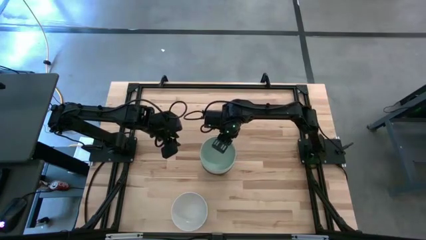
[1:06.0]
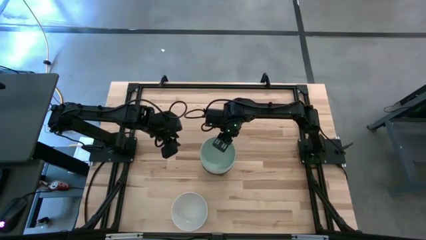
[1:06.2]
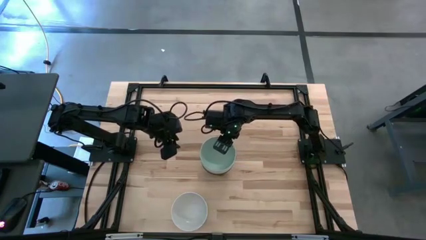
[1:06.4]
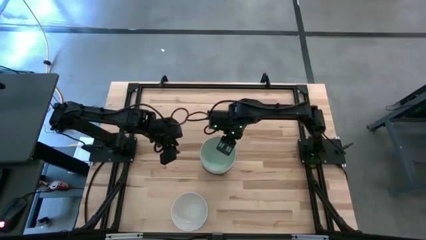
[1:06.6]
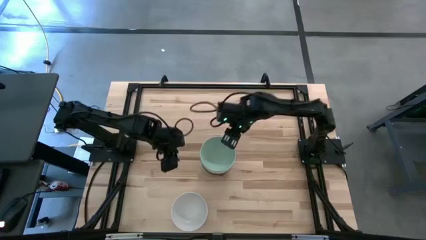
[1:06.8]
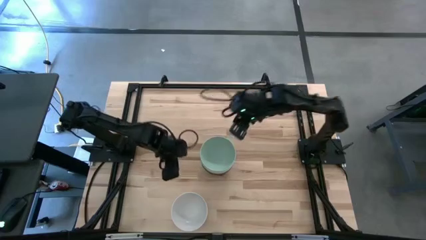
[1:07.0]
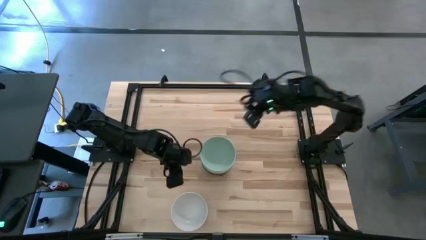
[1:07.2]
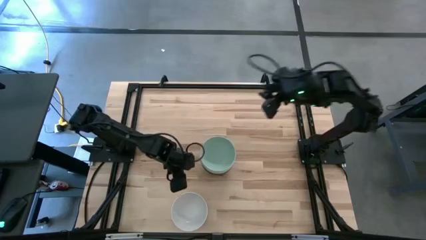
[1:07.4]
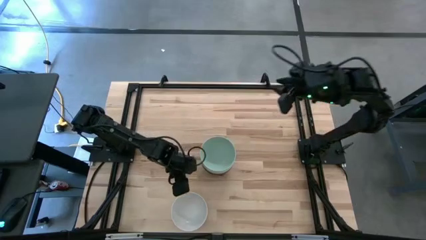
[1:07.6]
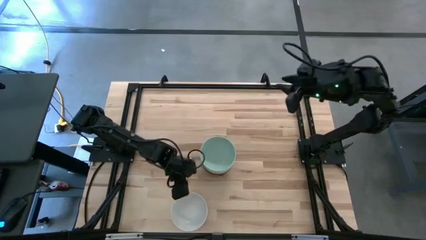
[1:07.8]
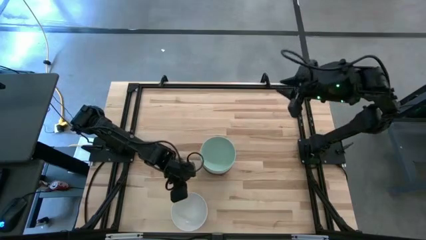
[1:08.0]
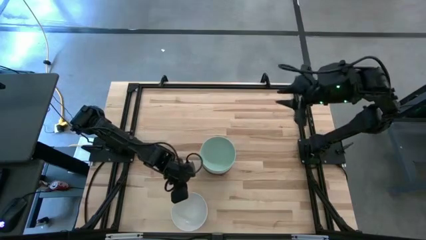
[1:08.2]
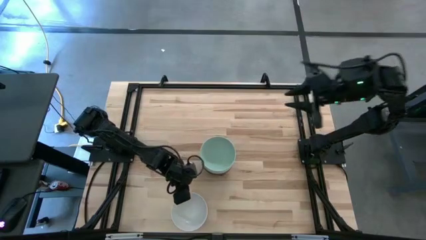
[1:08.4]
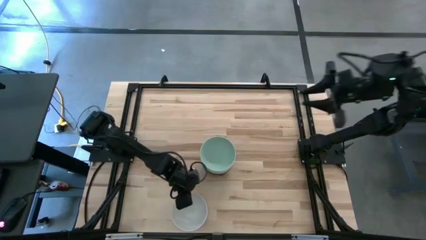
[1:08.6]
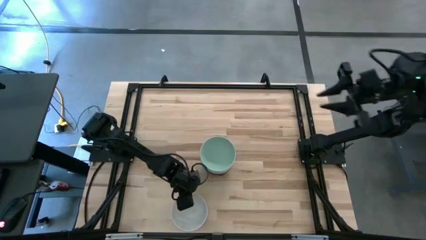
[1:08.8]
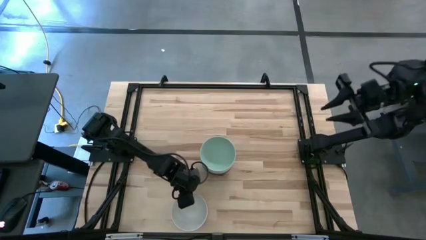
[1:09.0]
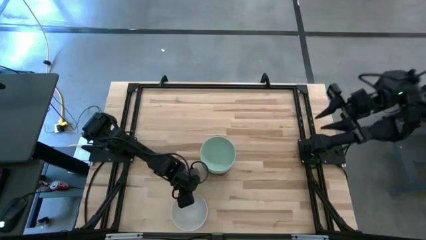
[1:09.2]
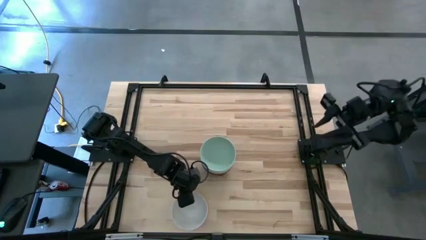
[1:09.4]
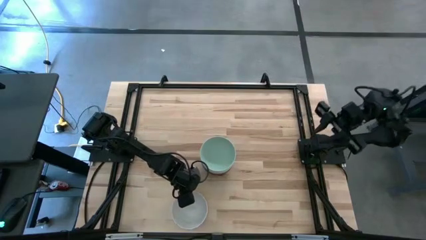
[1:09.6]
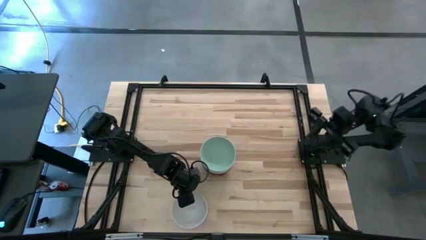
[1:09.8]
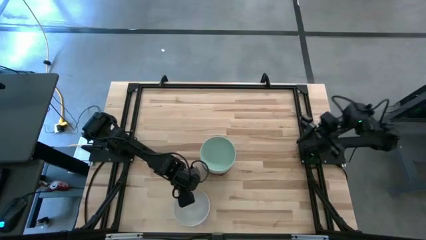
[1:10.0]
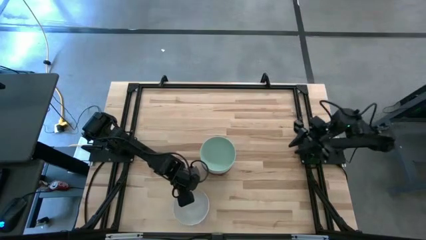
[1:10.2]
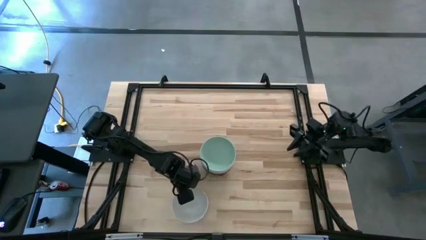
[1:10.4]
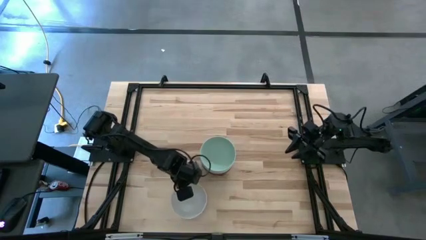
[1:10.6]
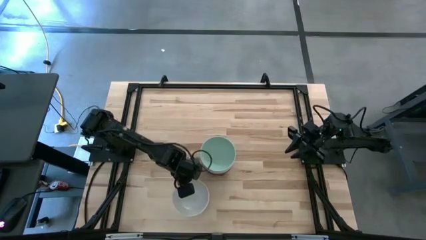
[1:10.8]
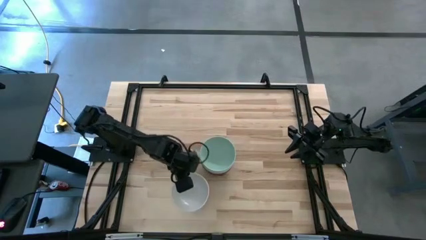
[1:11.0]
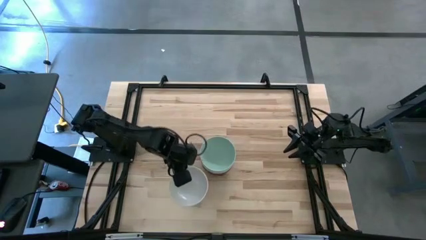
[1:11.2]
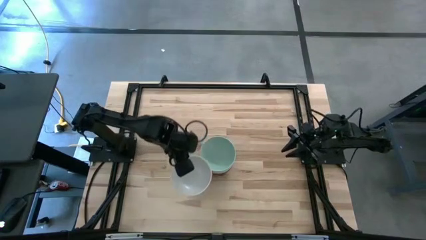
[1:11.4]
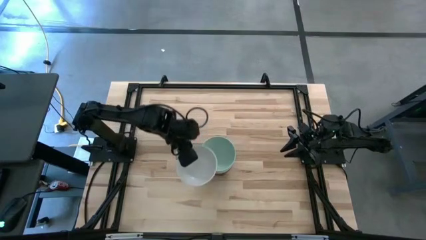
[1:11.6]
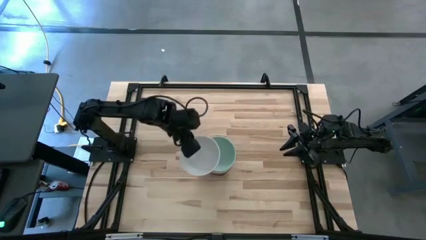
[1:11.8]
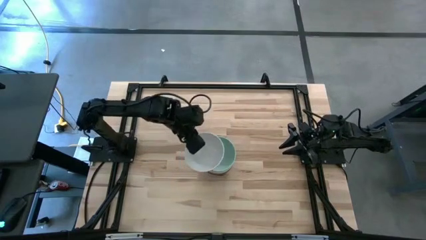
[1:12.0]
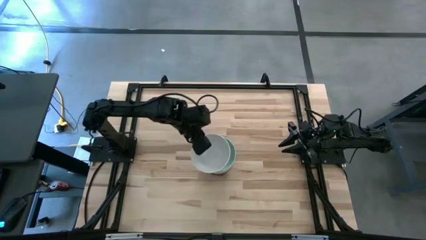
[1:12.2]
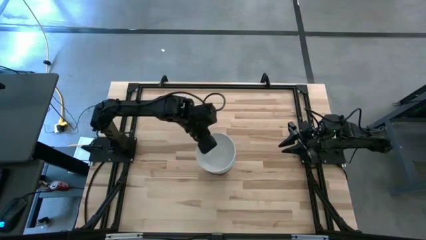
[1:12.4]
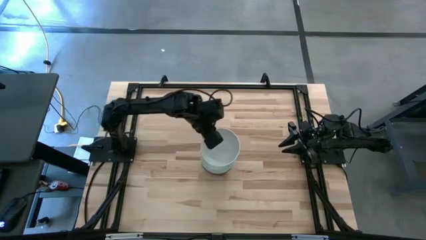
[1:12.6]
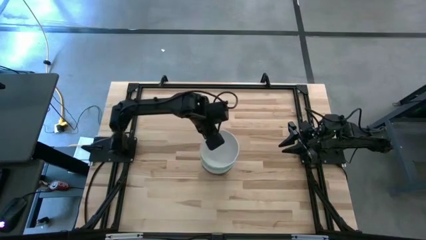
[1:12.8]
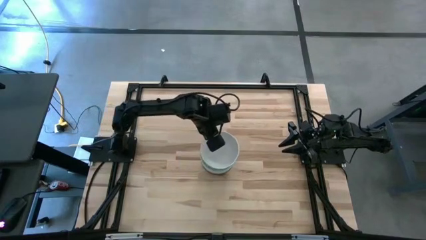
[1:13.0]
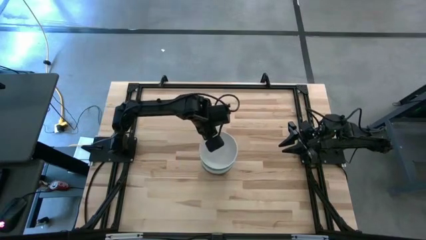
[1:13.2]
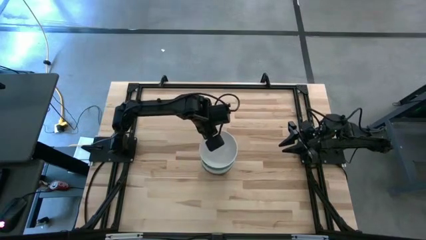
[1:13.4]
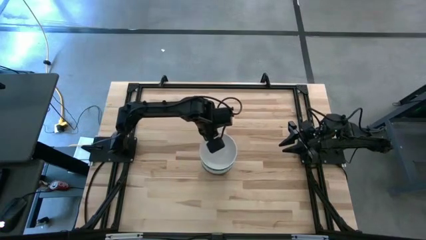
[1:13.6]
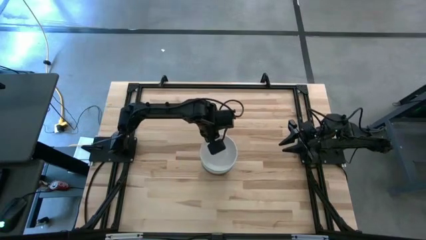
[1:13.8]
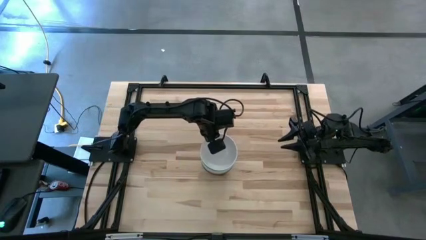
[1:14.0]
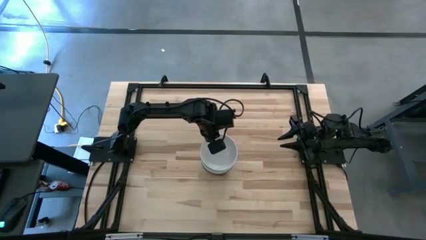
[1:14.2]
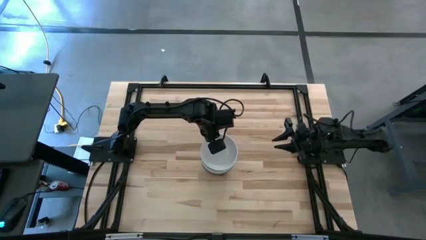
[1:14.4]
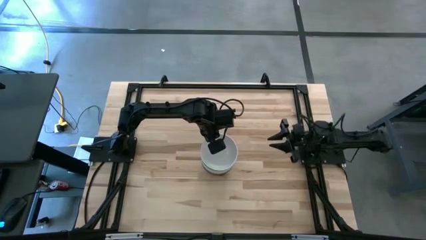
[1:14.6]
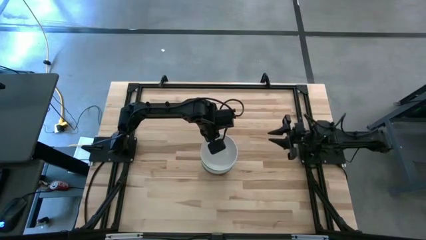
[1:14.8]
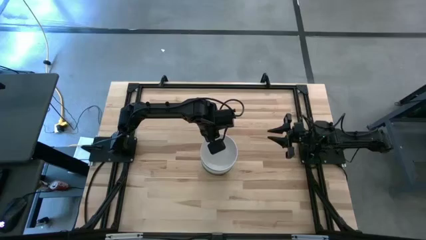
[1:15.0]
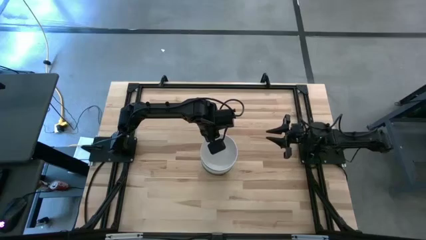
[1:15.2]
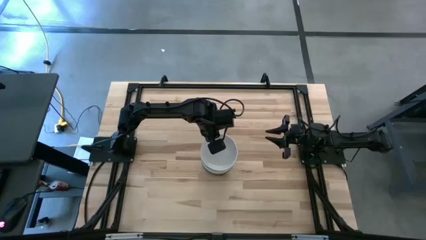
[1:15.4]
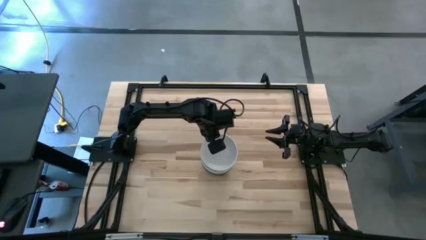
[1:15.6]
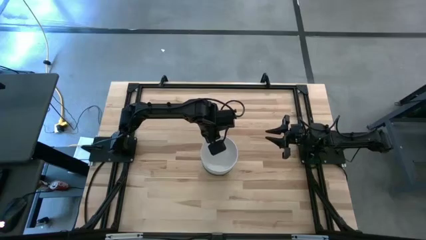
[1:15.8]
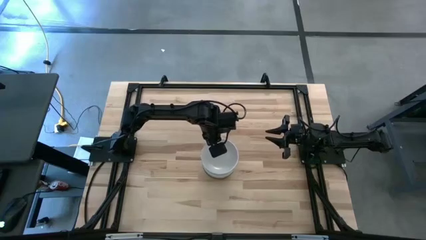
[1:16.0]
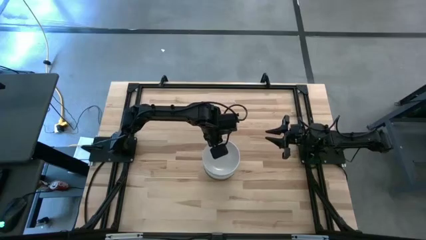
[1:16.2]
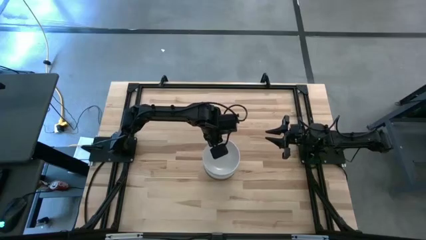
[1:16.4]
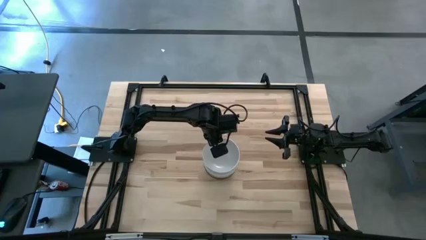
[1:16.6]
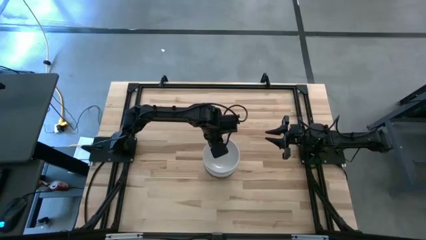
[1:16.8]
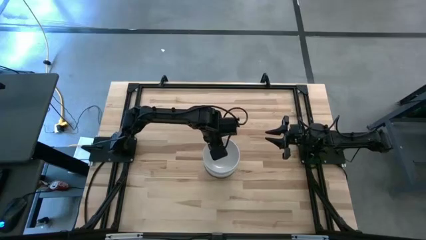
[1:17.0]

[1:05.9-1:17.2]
Task: Nest bowls inside each other
Stack the white bowl on the green bowl

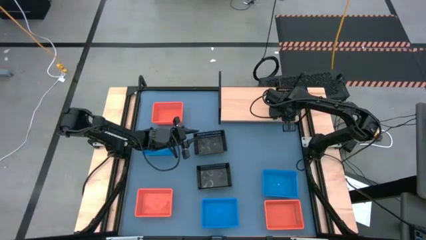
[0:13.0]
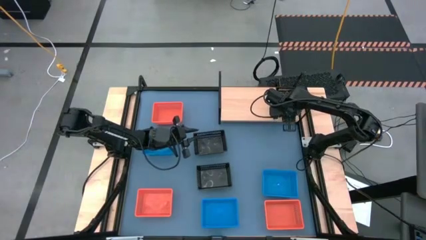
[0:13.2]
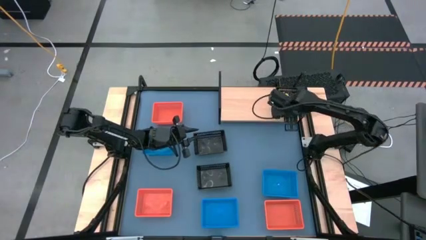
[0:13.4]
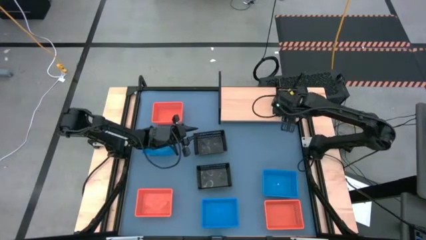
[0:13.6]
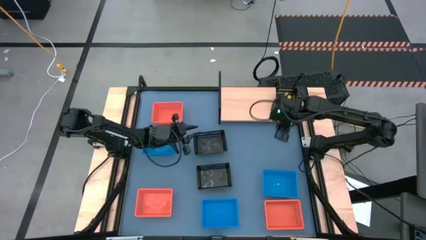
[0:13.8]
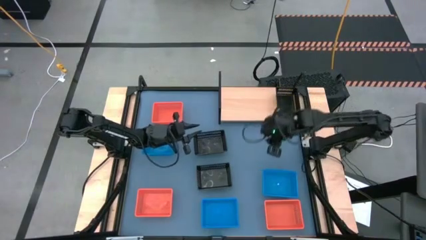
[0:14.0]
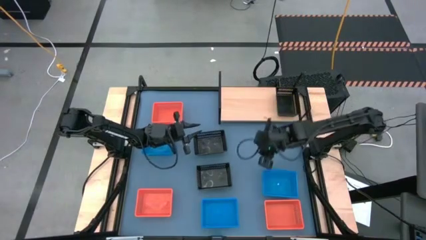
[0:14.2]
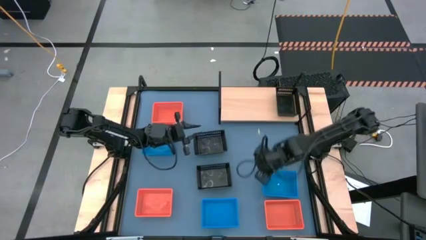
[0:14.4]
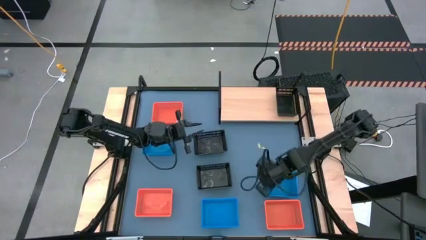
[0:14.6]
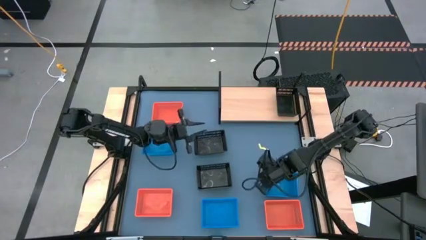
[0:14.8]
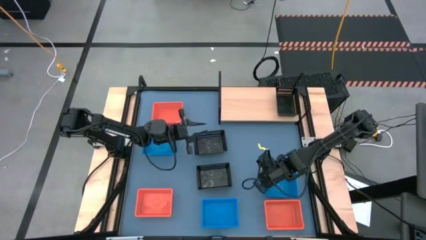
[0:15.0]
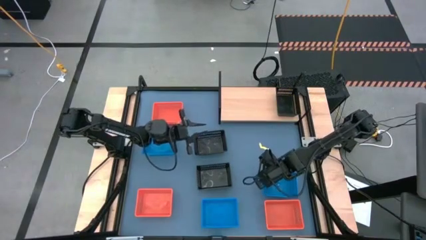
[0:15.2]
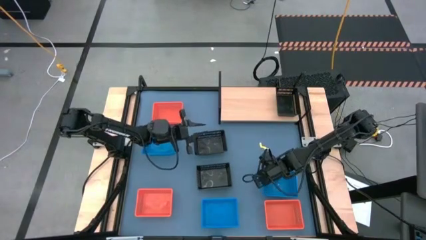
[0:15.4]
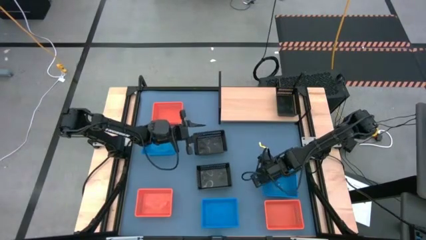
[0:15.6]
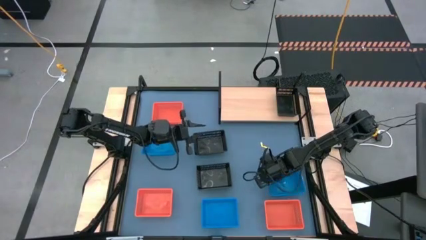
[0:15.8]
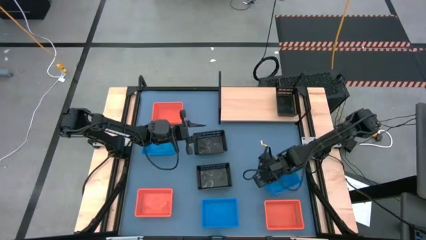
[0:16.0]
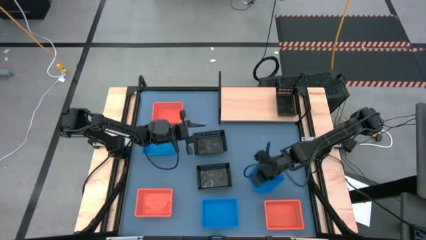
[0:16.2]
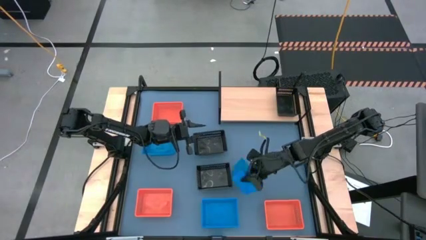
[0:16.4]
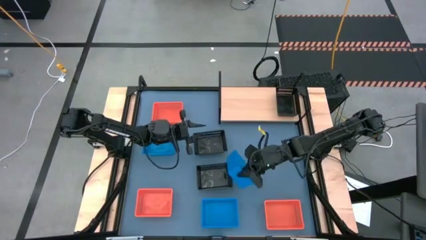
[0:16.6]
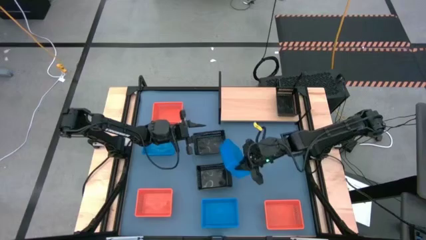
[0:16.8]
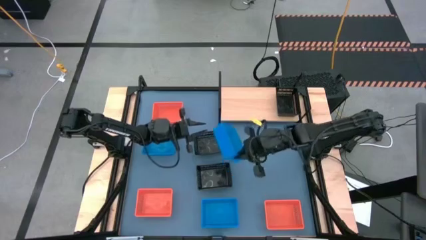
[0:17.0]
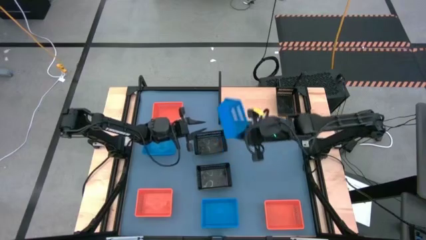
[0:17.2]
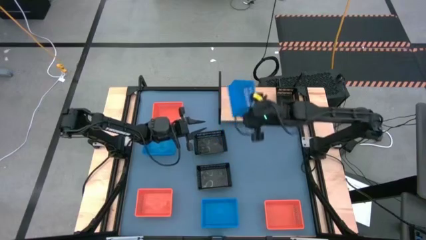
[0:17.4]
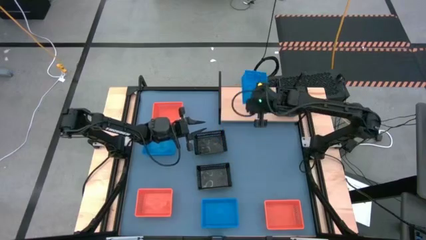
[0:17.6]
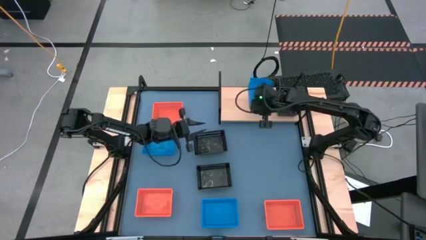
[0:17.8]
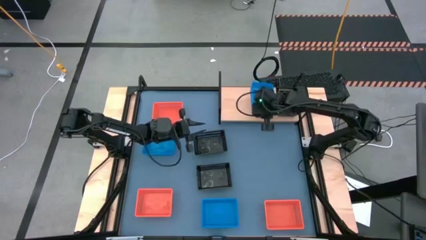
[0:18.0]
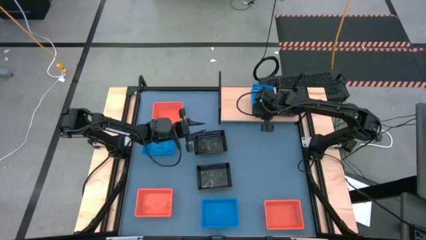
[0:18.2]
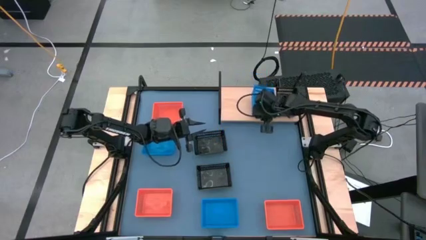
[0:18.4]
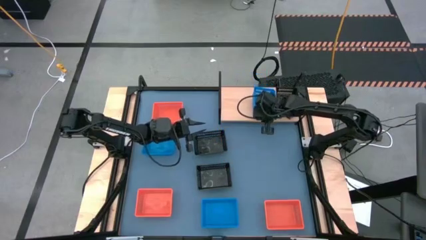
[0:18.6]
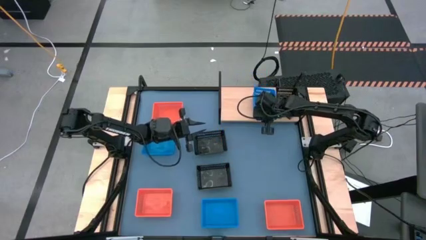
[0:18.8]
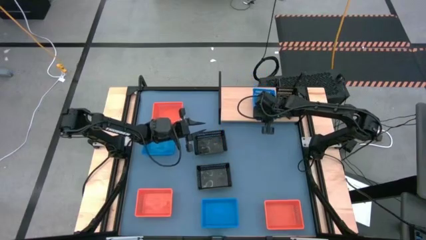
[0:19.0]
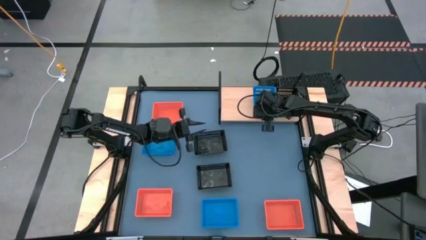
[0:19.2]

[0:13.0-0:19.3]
Task: Stack baskets on shelf by color
Put the middle right blue basket on the shelf
